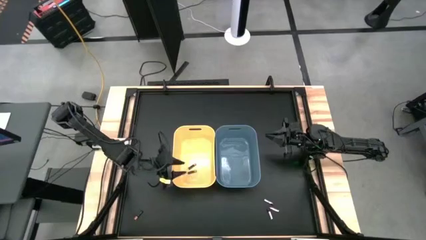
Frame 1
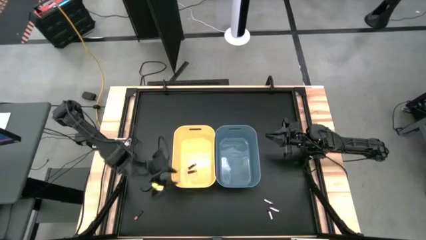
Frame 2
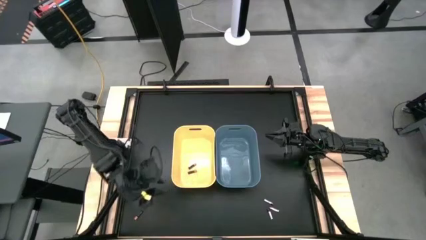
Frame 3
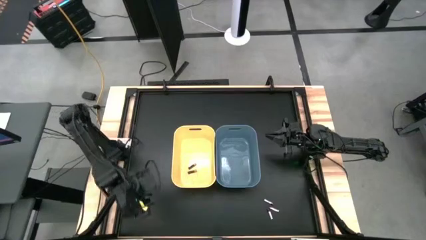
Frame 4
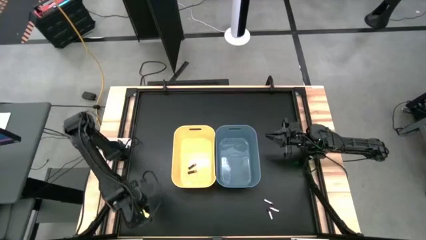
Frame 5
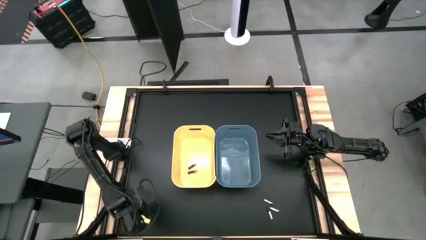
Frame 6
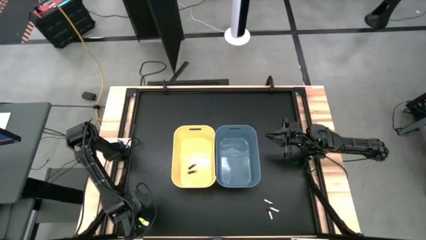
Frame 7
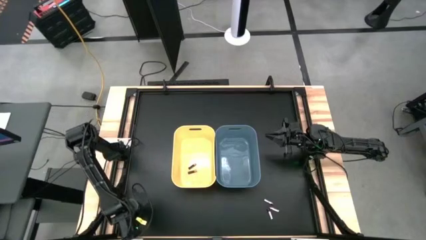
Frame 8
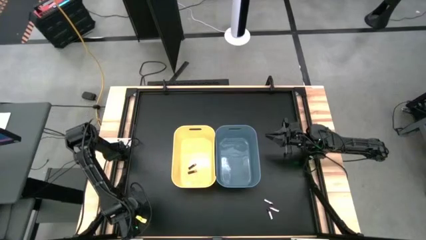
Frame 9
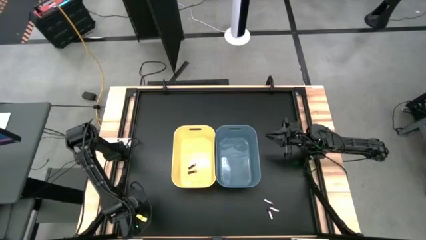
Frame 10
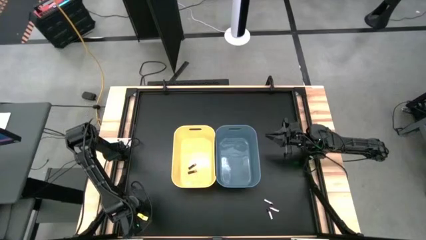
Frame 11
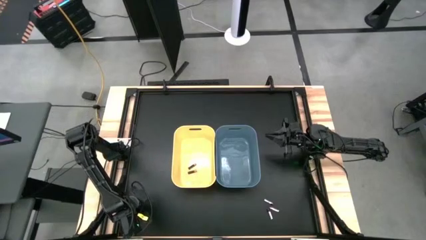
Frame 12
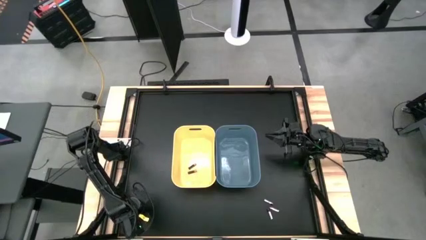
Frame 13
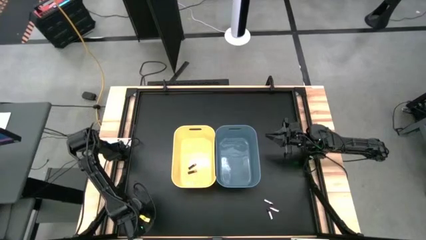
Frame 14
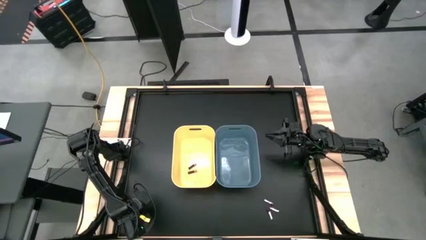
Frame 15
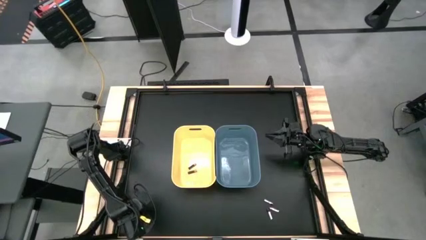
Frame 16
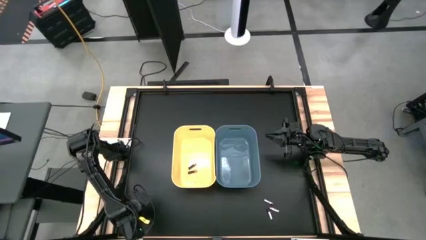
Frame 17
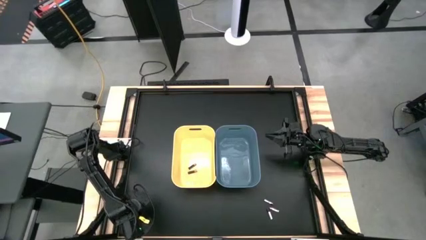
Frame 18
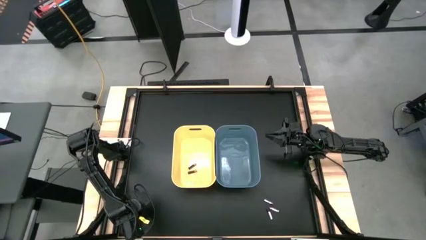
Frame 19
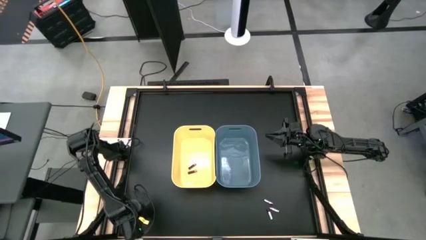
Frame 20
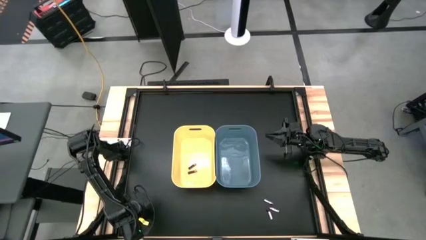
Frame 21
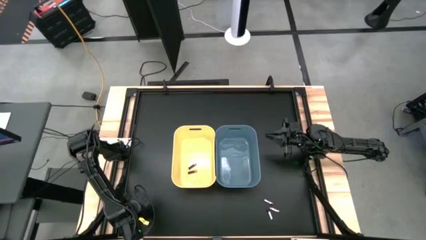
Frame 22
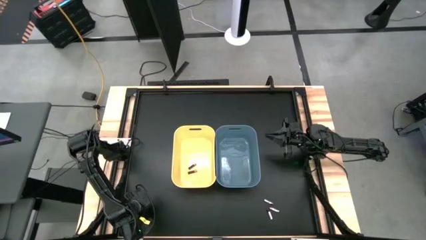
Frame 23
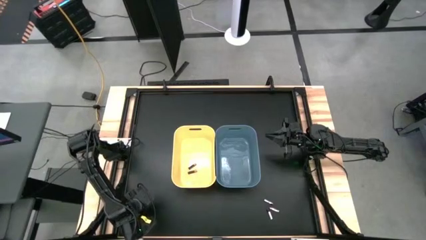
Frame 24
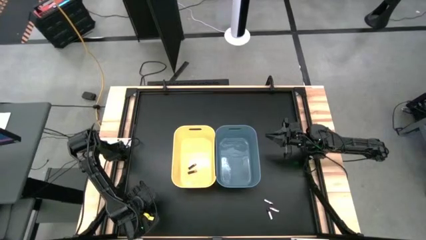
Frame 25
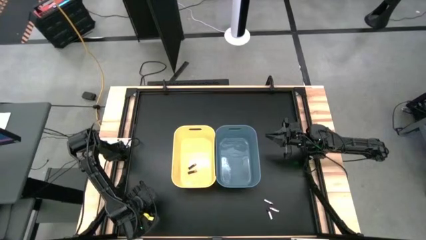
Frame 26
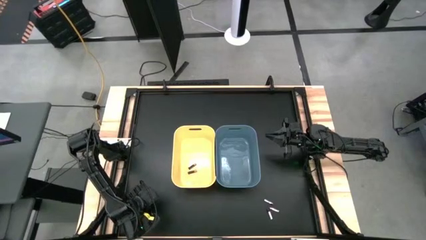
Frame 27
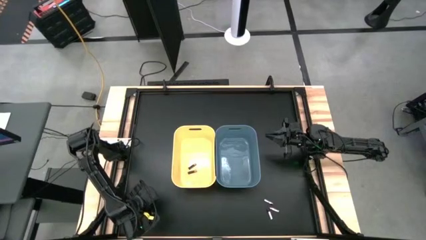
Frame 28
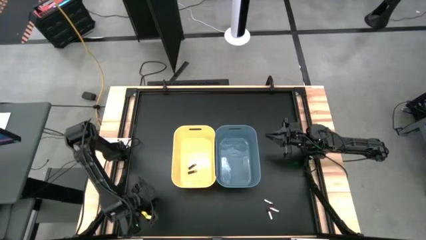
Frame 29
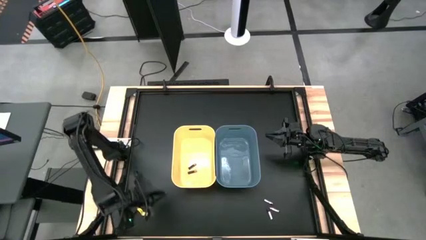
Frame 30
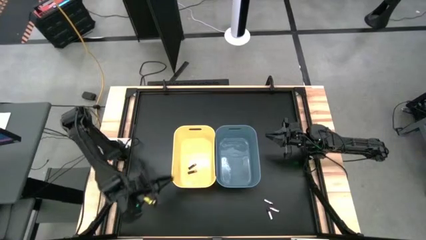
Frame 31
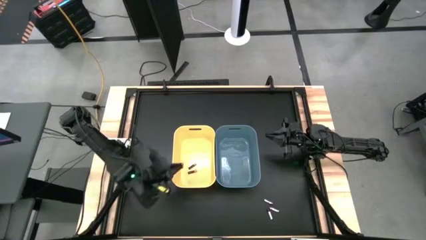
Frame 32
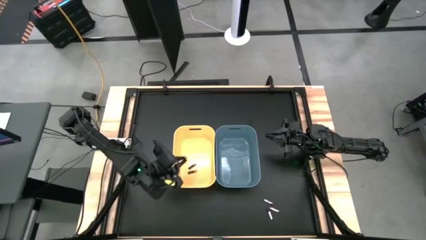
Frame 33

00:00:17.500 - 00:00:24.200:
Task: Sort batteries
Put the black battery into the yellow bin

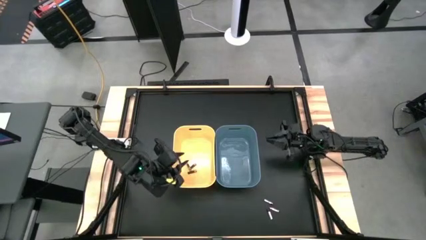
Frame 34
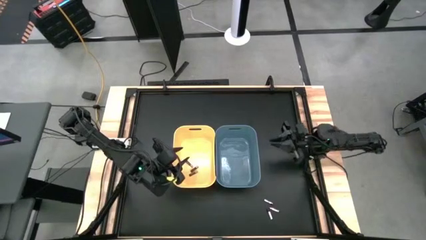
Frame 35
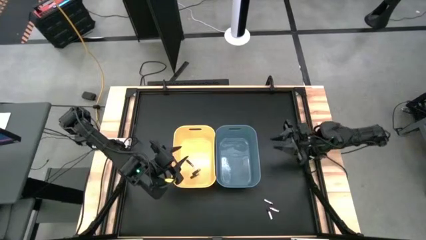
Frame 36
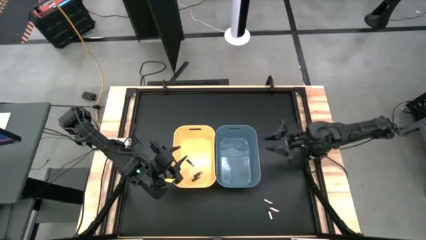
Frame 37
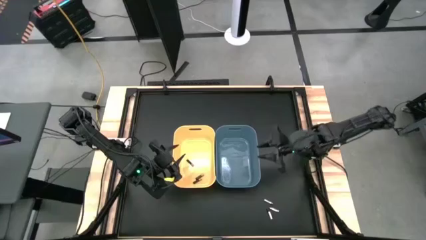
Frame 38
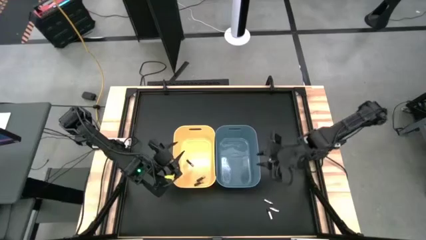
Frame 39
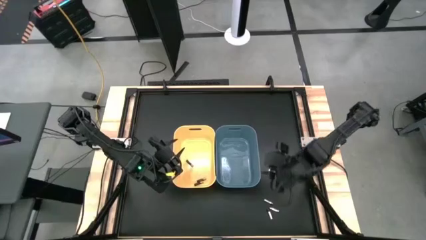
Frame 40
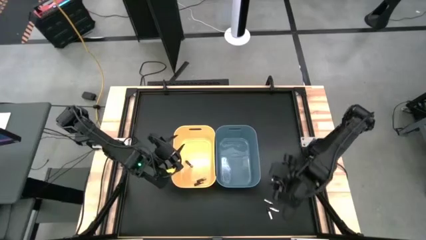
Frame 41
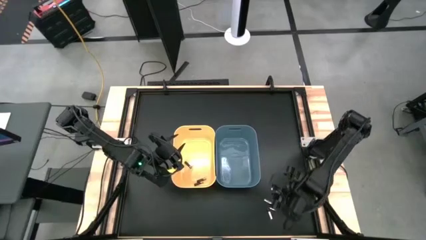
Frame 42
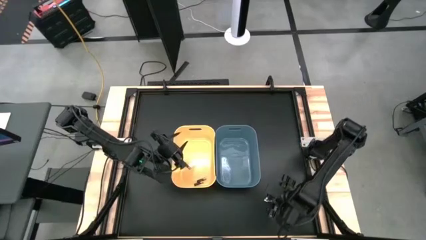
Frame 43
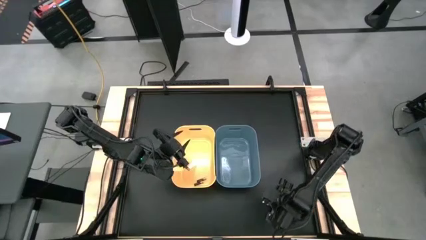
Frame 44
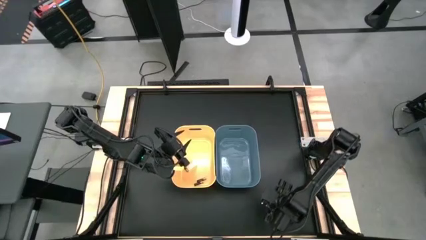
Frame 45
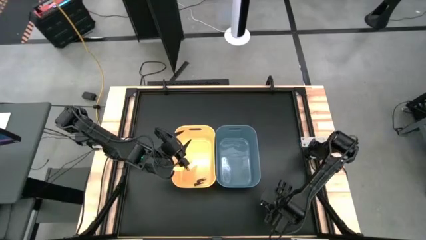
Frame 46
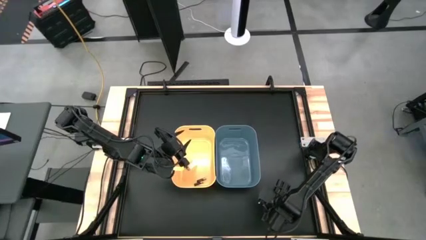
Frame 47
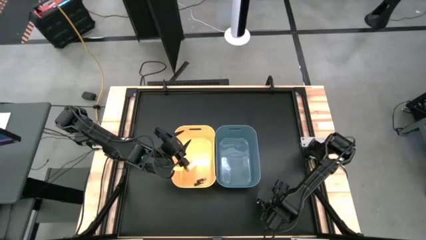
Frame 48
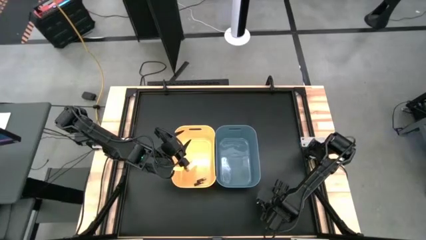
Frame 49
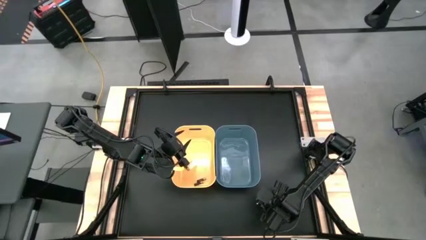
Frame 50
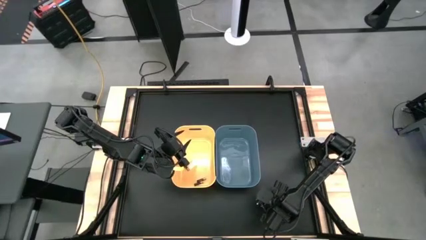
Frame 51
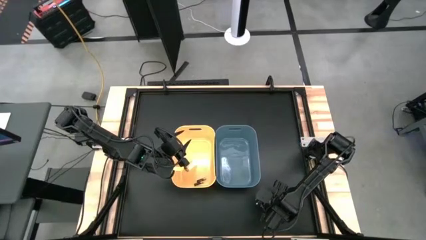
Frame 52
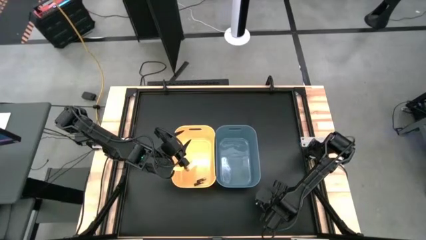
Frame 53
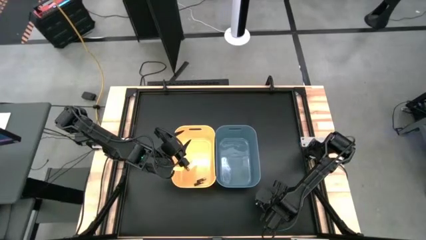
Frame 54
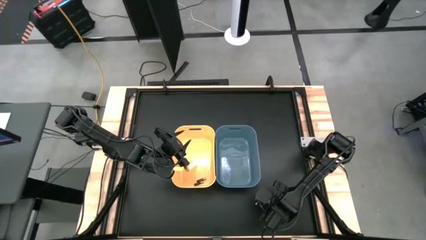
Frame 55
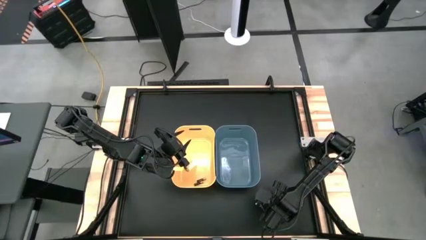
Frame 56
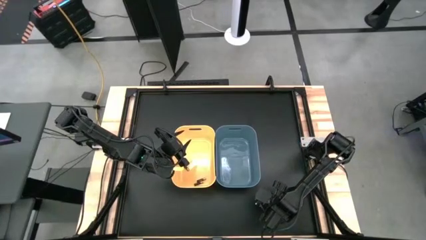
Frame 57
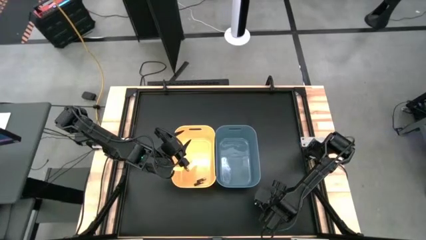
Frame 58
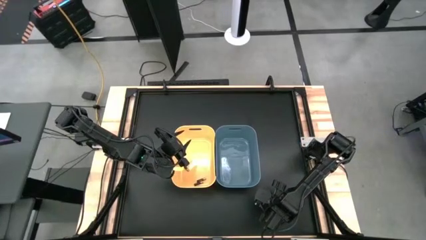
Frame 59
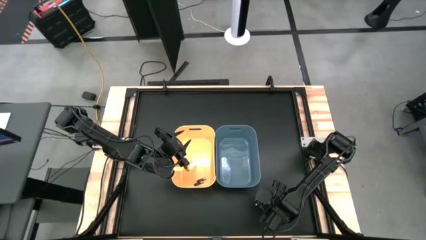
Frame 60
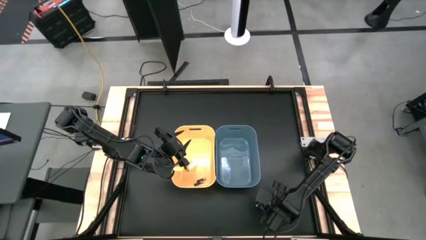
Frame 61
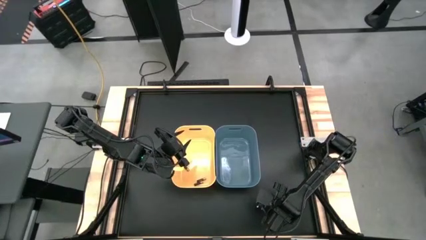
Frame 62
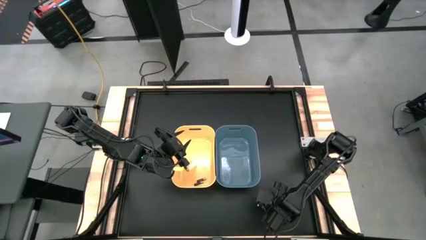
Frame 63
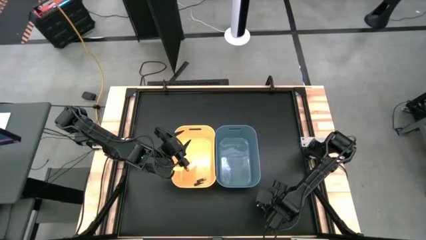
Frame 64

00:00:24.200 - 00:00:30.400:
Put the top silver battery into the blue bin

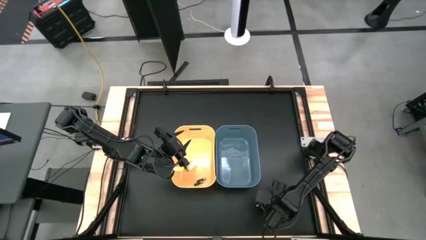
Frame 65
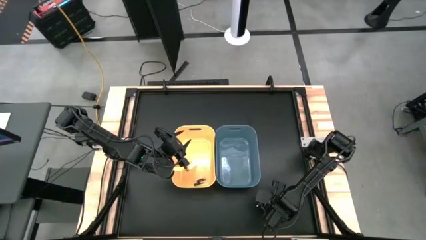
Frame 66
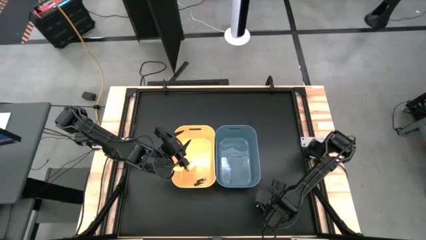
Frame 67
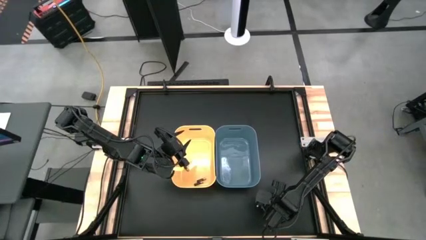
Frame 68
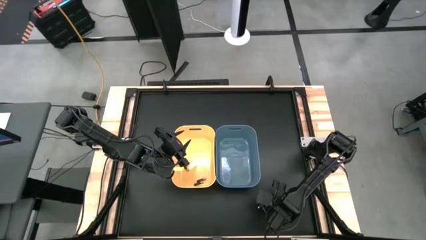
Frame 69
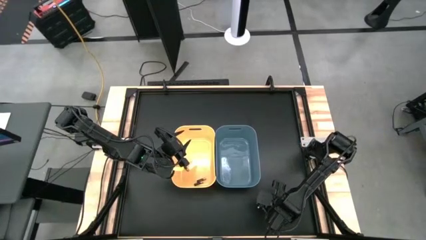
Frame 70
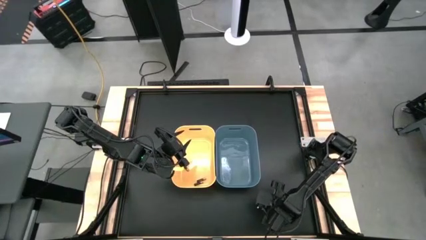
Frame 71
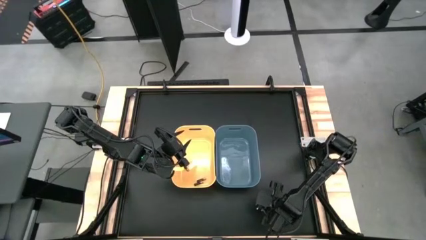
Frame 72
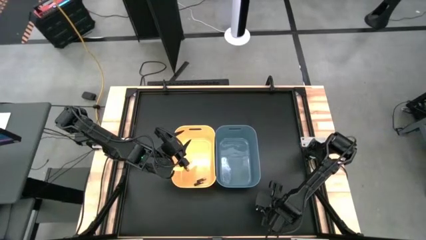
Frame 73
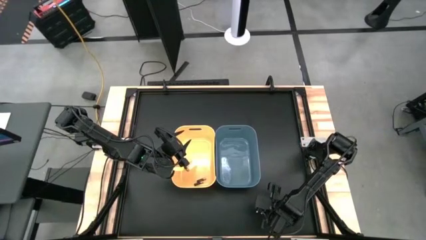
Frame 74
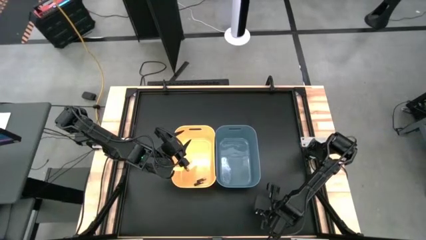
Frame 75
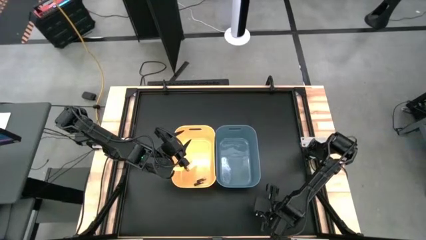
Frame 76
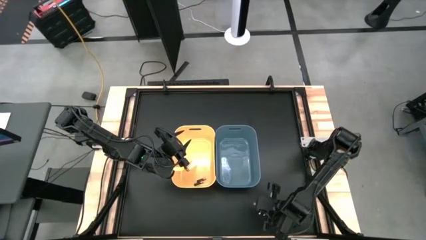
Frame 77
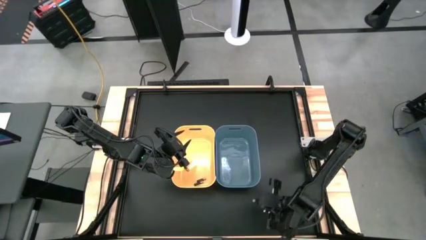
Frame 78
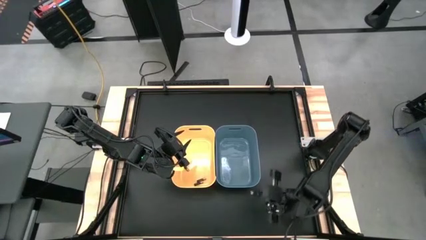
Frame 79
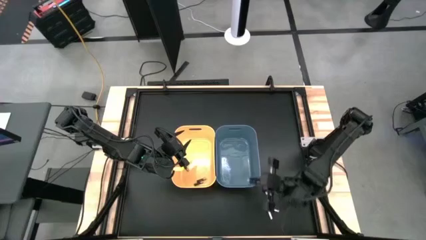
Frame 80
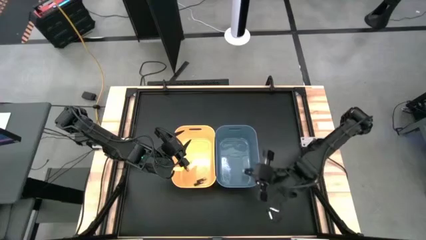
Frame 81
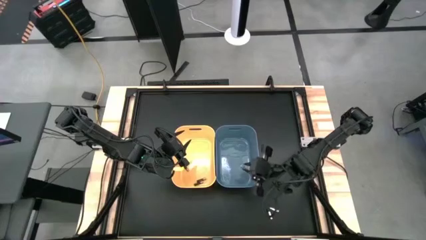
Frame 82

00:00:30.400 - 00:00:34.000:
Put the top silver battery into the blue bin

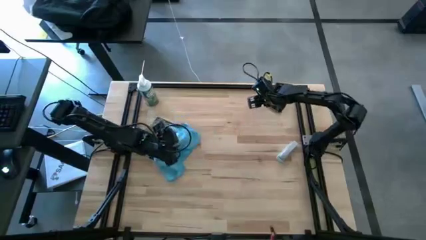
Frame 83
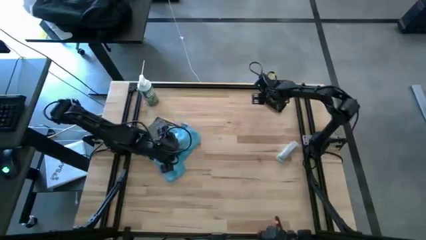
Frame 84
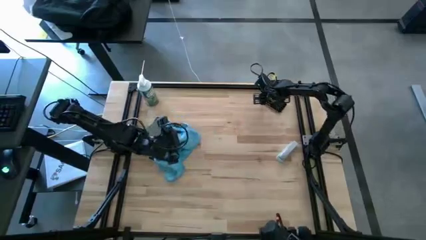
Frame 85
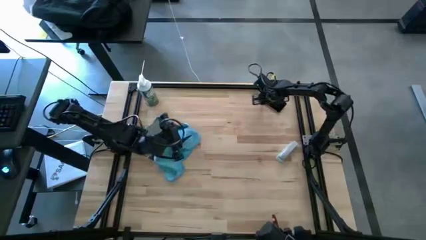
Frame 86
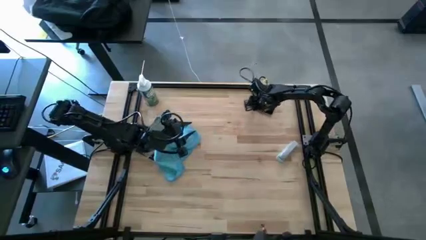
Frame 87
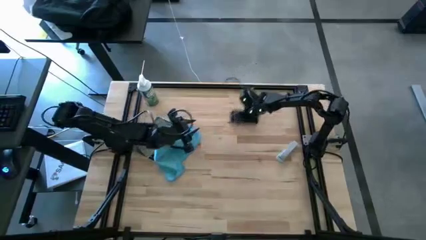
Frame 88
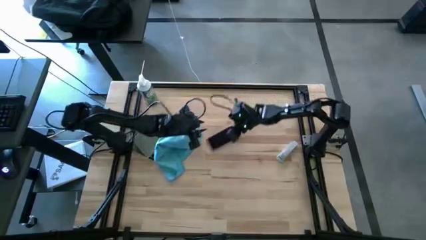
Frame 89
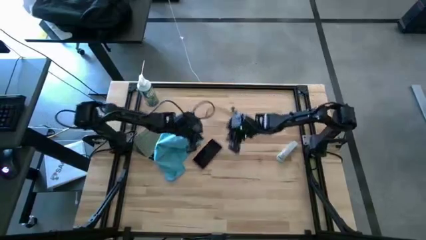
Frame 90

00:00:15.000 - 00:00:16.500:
Task: Apply microfiber cloth
Move the cellphone from the top right to the center of the table
